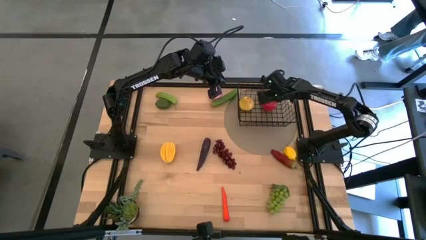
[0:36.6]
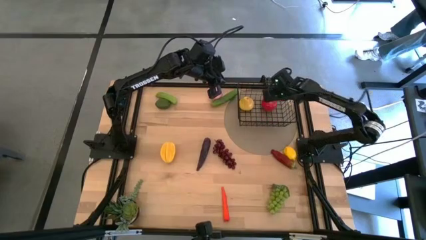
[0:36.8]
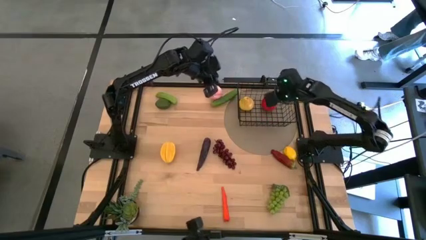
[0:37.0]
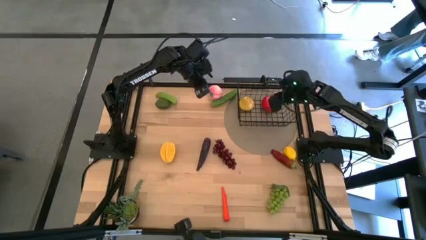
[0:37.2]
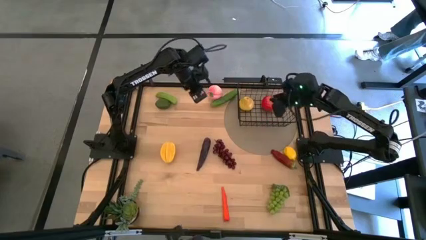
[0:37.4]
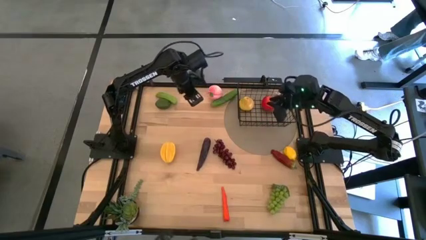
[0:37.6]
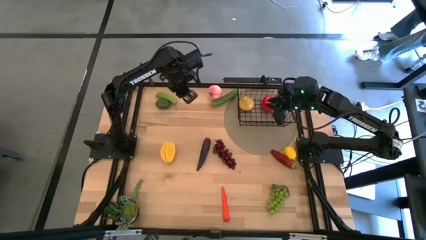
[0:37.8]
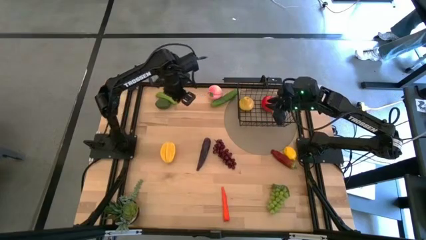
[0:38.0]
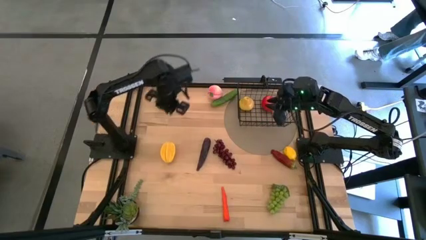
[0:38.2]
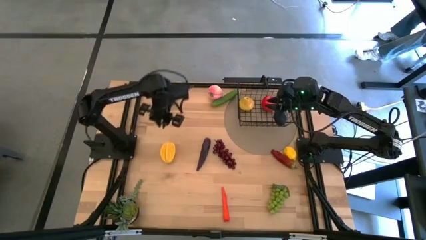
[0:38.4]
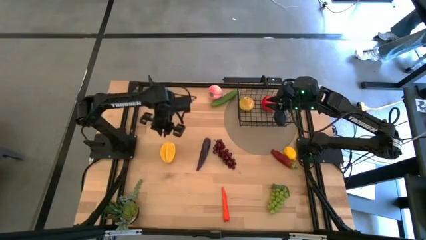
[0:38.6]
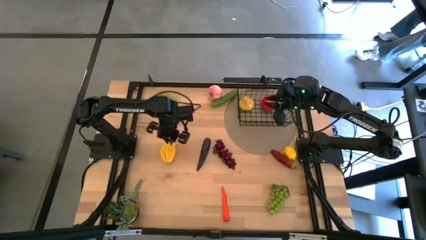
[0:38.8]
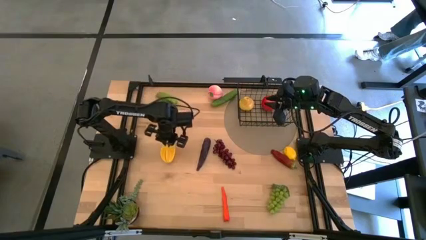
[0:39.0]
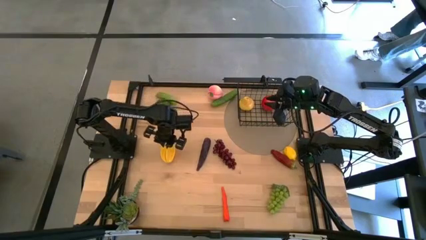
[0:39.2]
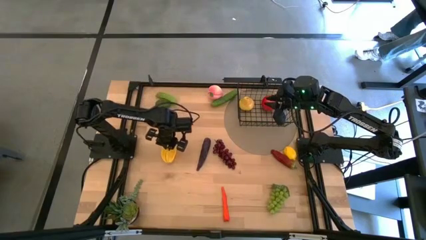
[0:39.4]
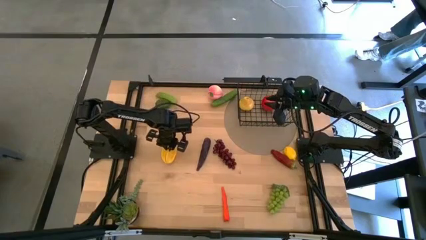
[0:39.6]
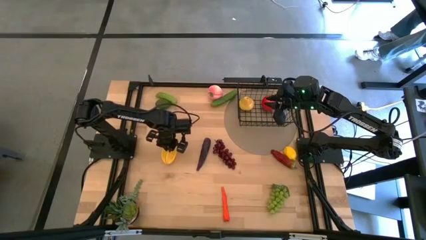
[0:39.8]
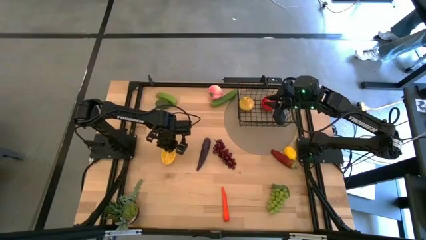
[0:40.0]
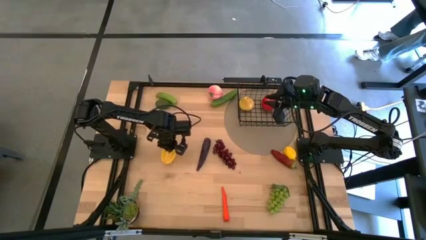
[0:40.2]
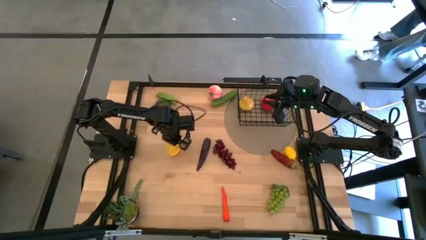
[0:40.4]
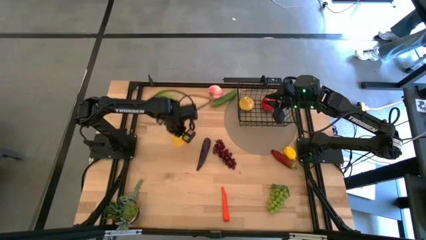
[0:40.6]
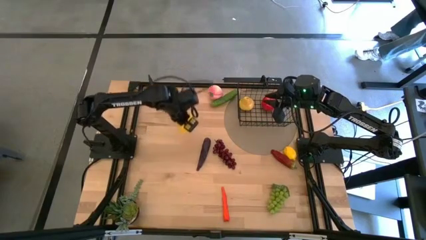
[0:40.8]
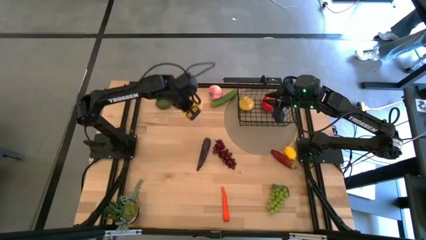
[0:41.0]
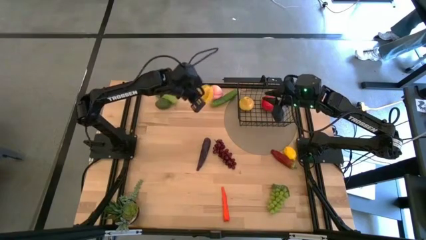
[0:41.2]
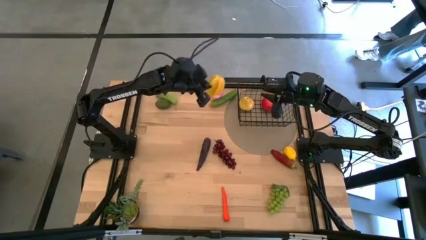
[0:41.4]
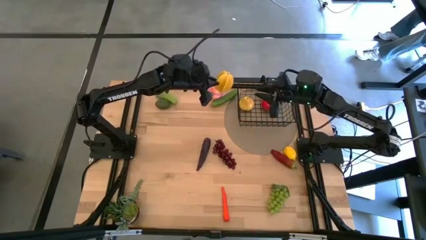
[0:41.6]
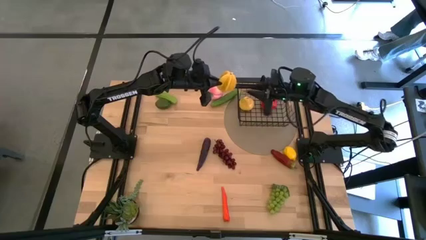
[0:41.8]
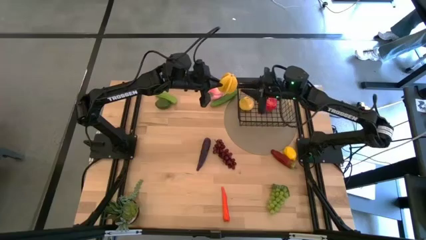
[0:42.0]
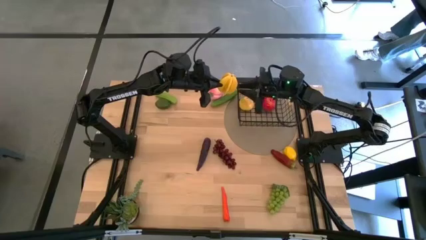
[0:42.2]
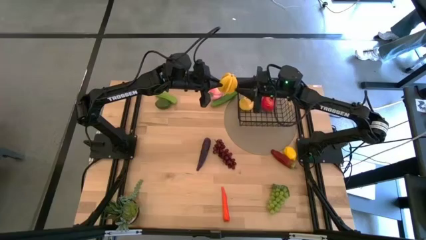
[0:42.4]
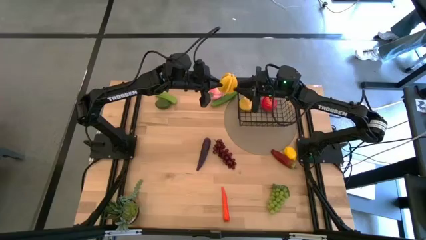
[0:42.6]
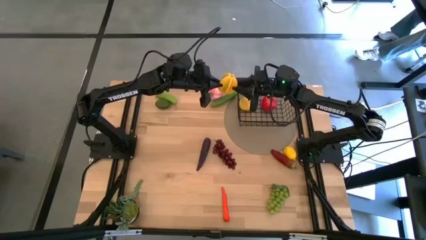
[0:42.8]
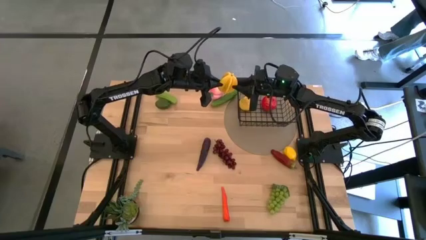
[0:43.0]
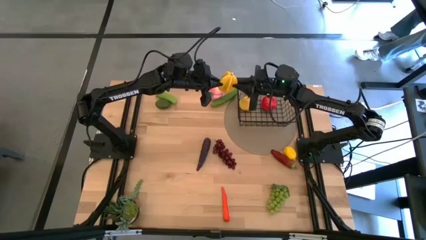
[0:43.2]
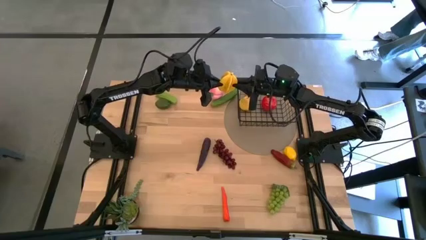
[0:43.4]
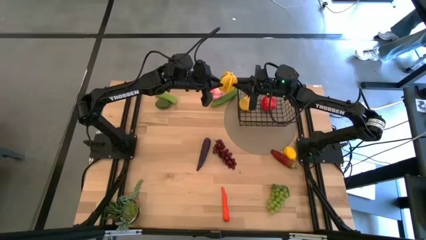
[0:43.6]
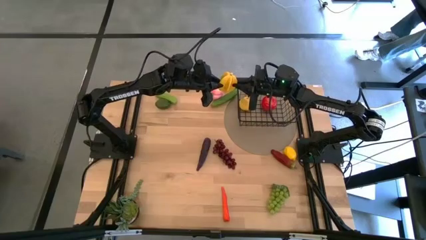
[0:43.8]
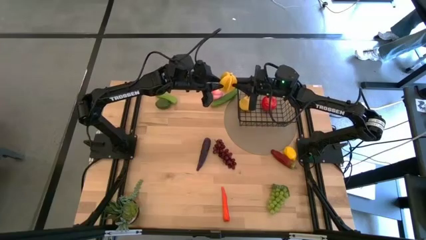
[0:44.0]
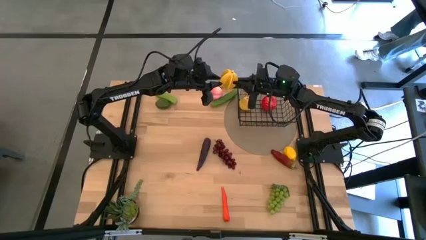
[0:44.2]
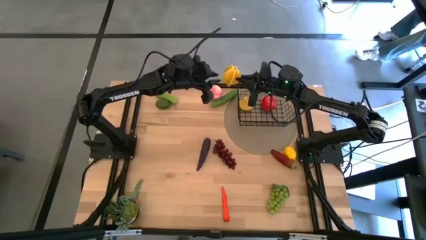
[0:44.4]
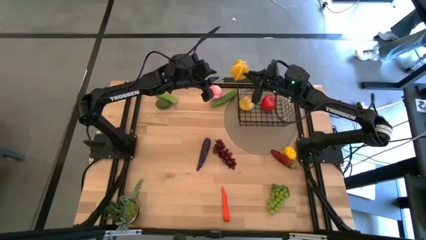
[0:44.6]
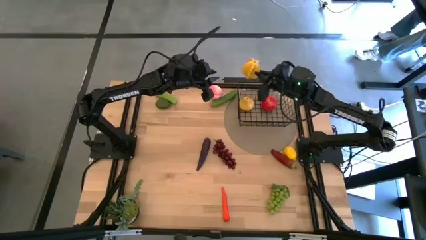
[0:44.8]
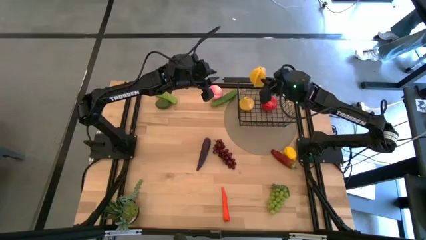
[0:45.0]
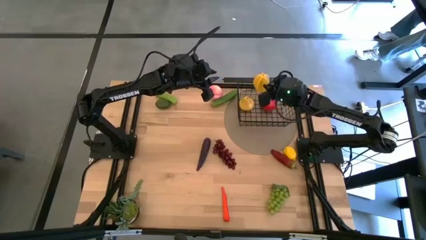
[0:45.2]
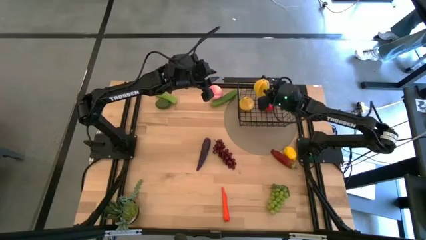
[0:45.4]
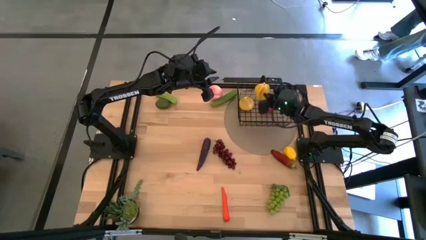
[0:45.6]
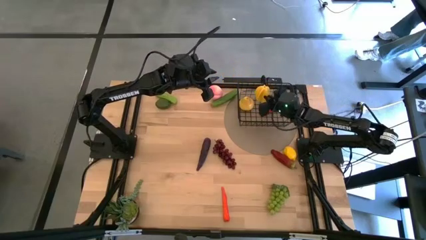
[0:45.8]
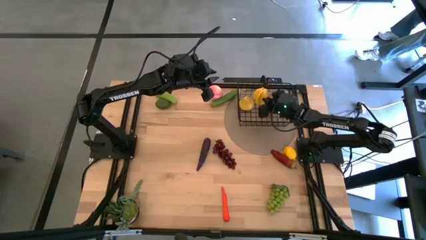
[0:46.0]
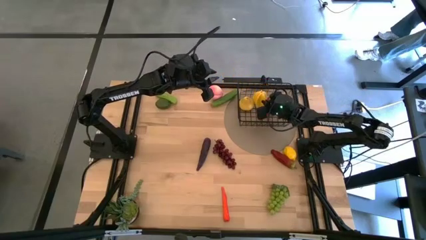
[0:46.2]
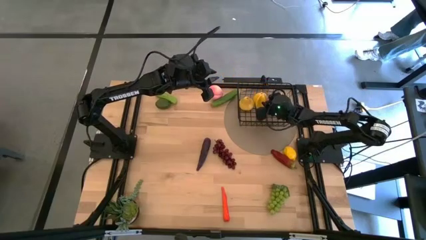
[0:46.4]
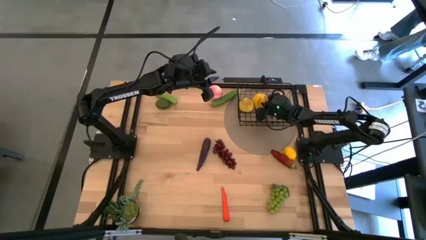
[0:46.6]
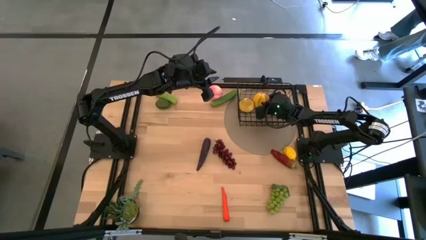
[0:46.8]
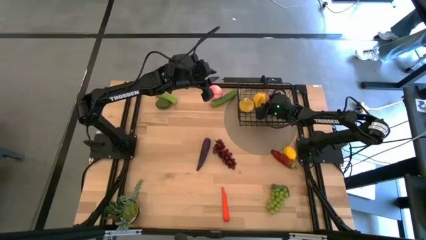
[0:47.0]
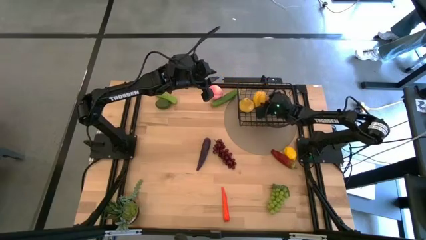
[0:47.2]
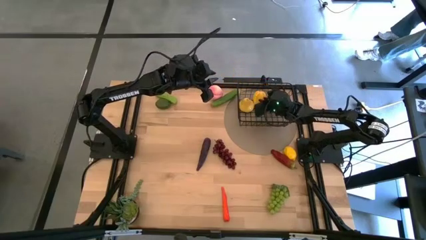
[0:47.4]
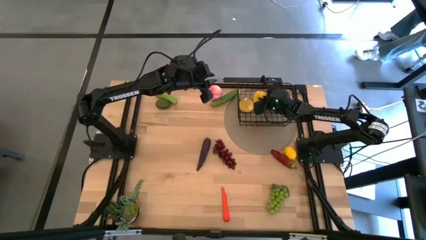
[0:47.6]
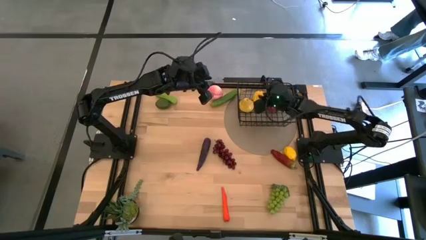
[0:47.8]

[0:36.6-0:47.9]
Task: Build produce basket
Put the yellow starfruit into the black wire basket

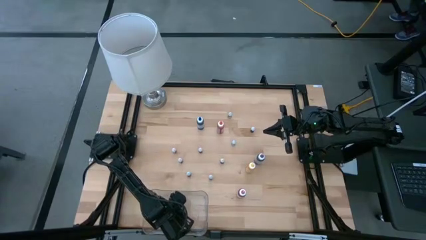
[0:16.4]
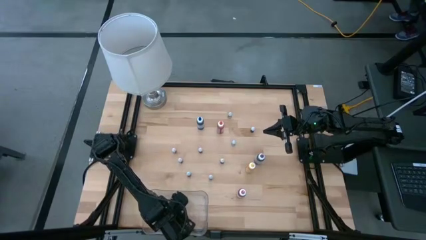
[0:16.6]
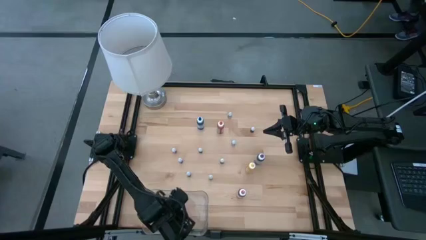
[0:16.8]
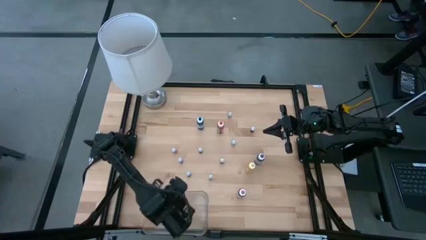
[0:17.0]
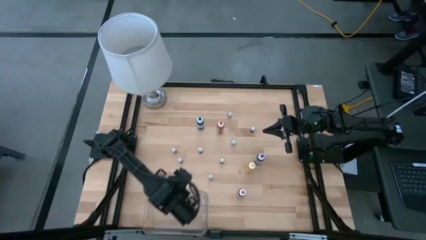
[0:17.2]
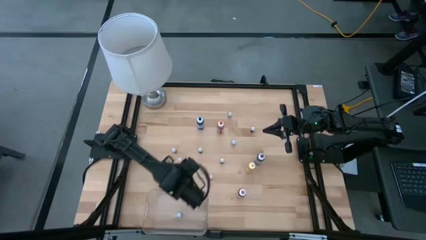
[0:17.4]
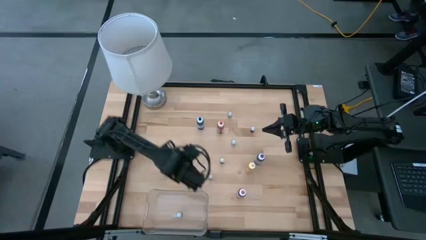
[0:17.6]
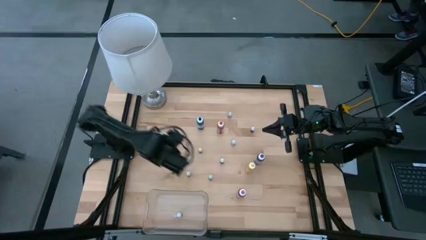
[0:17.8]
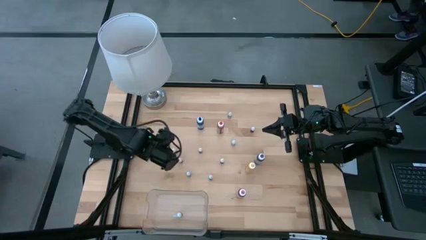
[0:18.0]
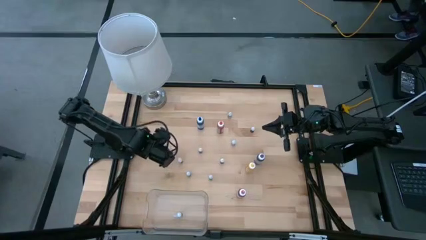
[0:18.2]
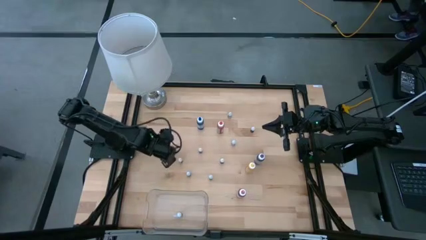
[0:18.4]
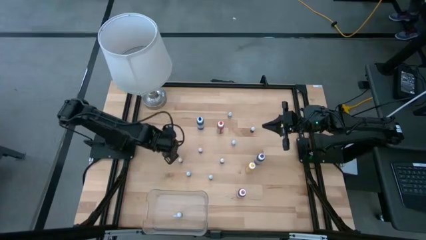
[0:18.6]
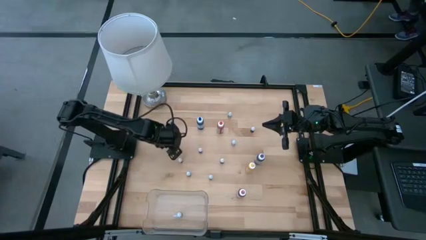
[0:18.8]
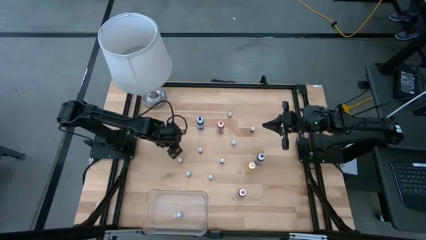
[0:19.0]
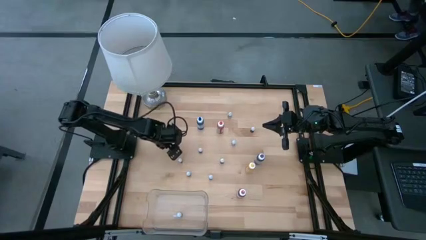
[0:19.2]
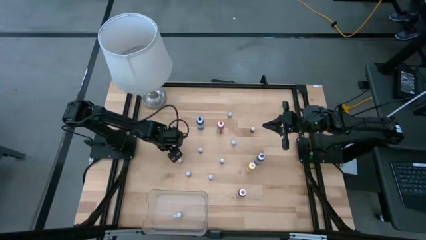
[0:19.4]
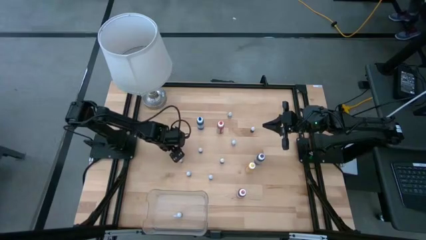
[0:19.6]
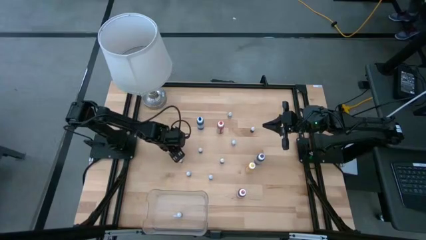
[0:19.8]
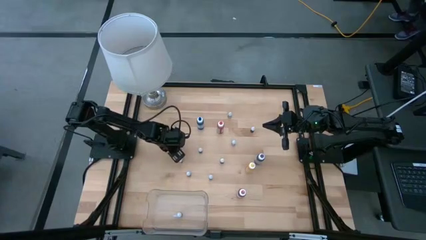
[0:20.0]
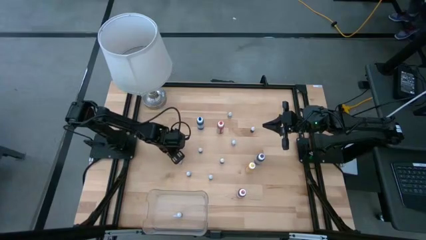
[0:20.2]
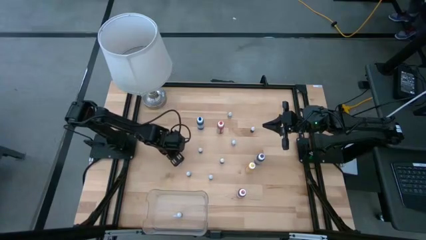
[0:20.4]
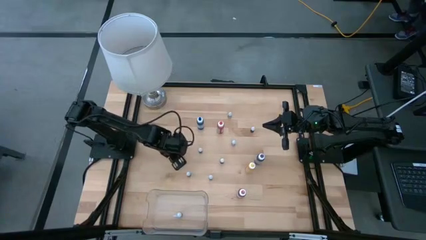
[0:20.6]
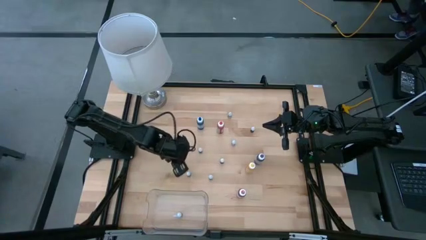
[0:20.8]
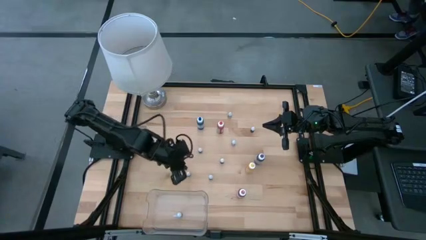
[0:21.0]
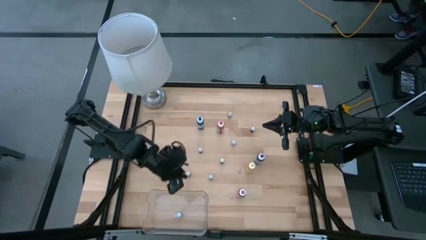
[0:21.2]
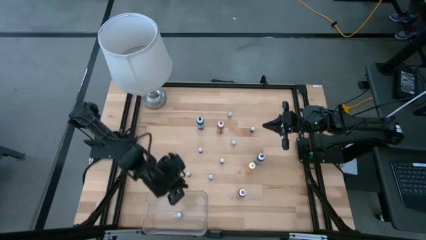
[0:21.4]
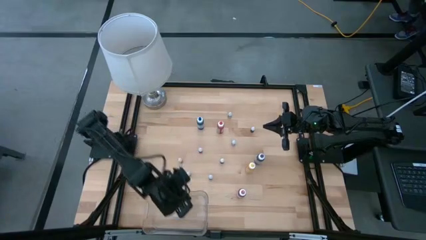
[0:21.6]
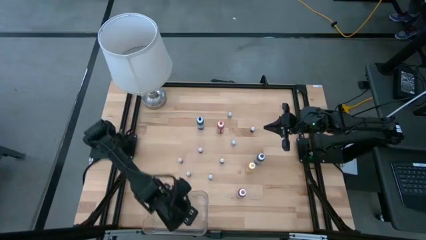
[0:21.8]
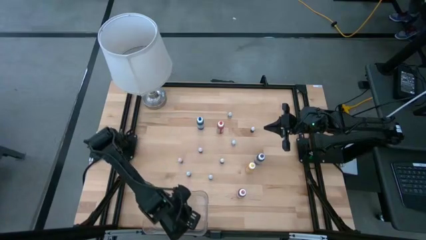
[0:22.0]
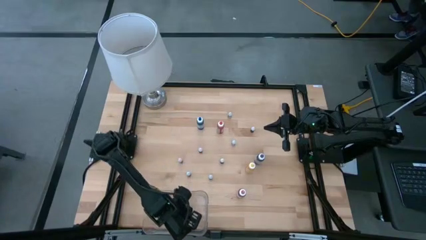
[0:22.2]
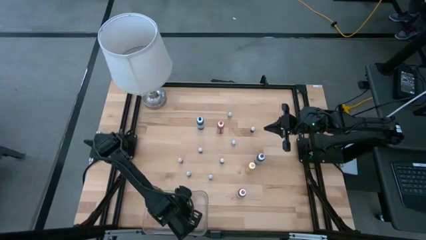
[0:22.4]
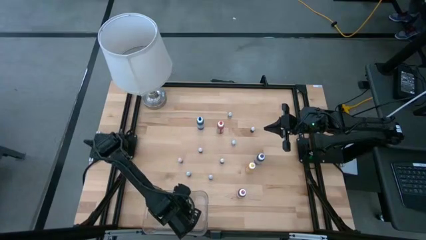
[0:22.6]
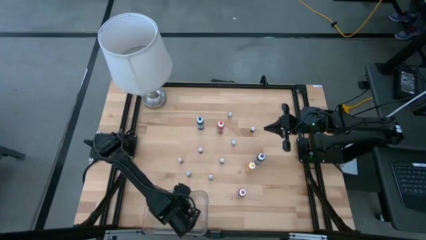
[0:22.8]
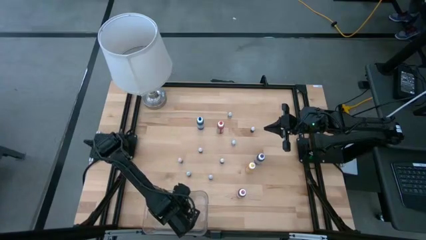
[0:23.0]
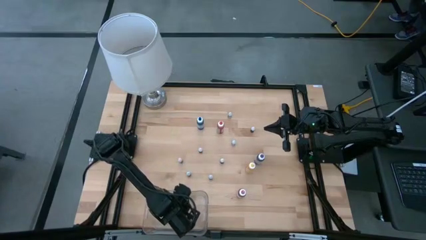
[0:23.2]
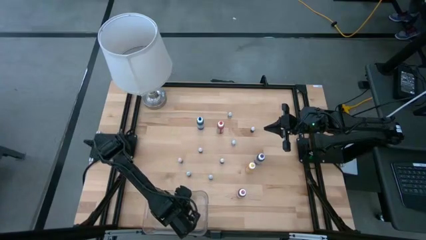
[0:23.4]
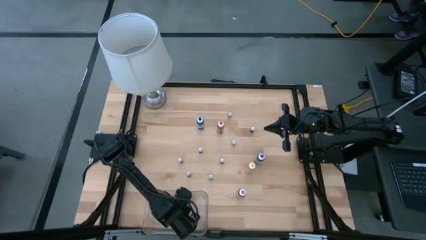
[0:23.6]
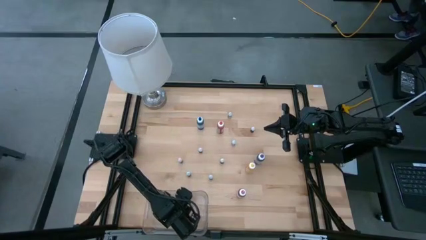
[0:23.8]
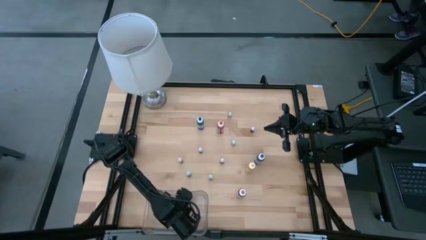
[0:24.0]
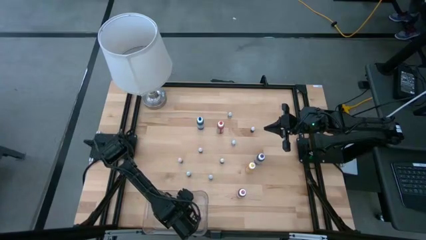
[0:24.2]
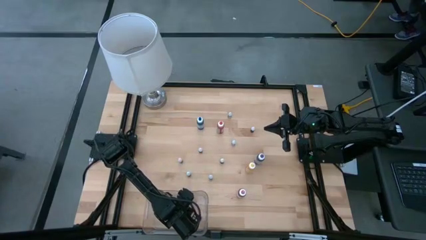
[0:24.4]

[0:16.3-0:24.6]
Task: Pick & Place food coloring
Put the bottom small pink food coloring bottle into the bin
